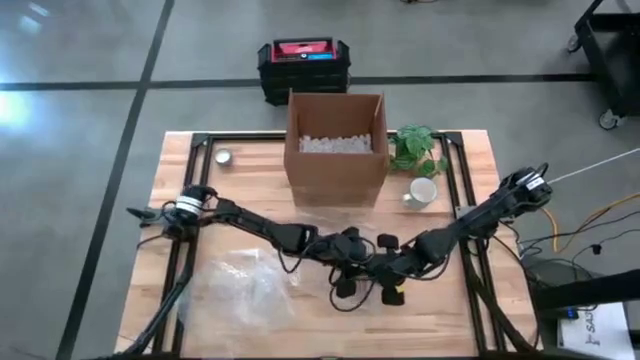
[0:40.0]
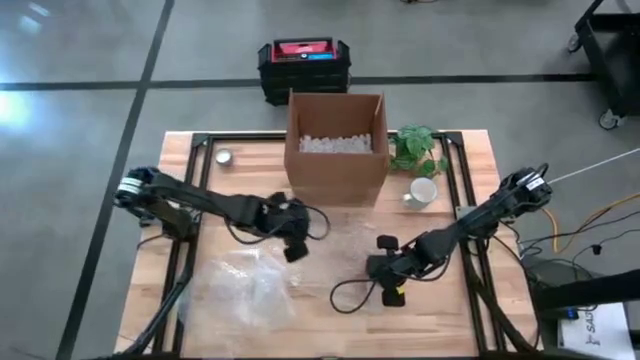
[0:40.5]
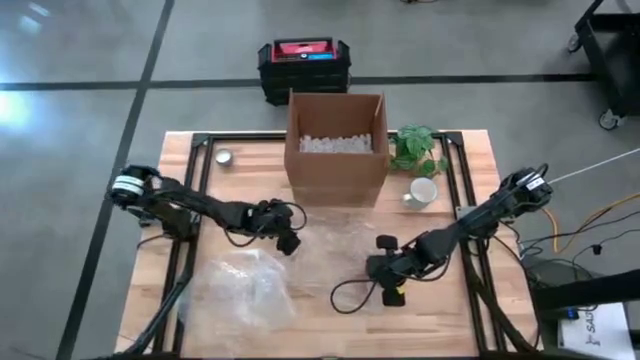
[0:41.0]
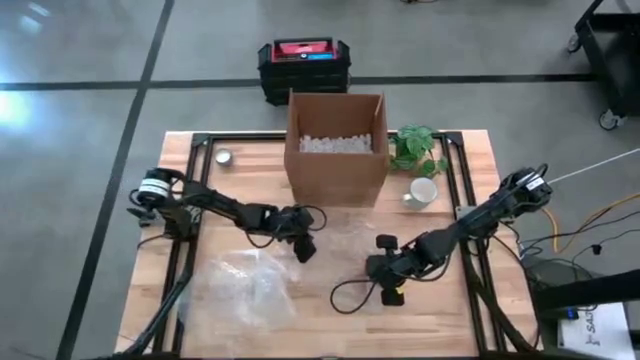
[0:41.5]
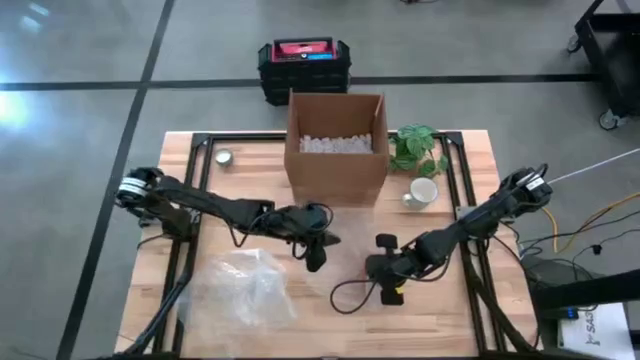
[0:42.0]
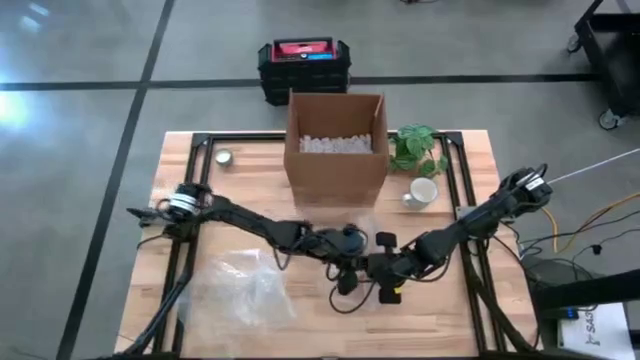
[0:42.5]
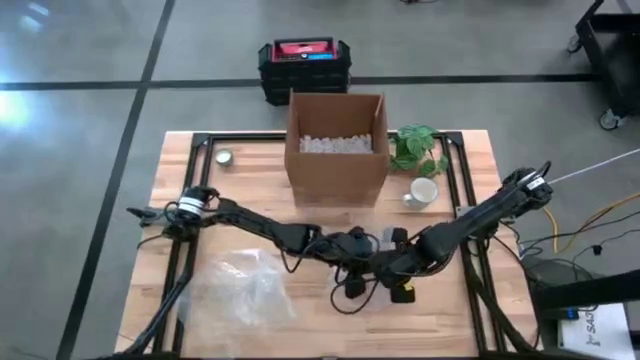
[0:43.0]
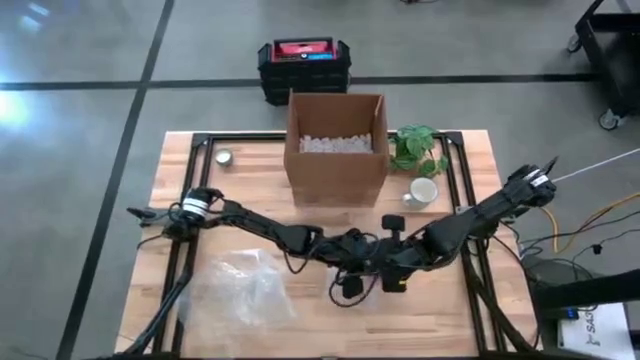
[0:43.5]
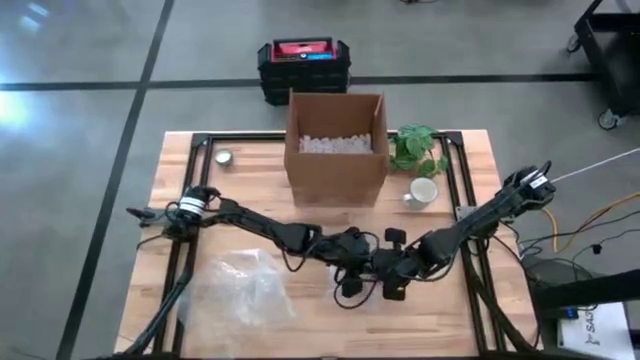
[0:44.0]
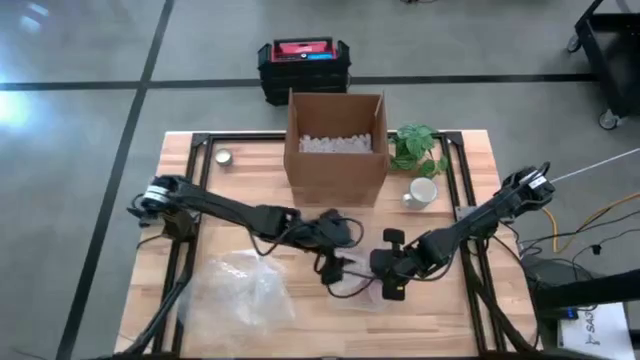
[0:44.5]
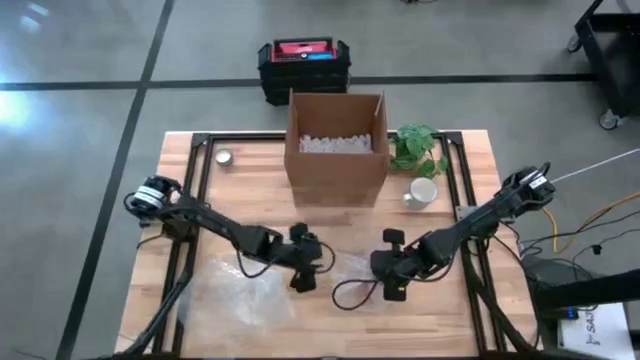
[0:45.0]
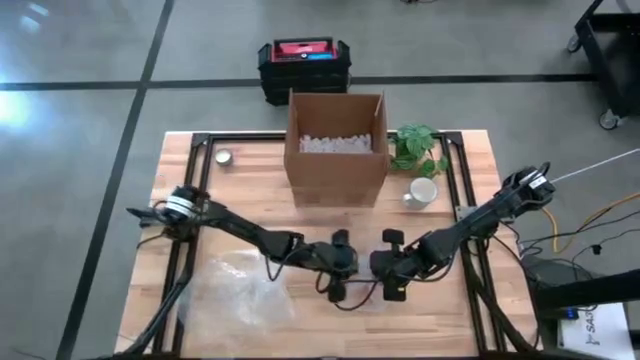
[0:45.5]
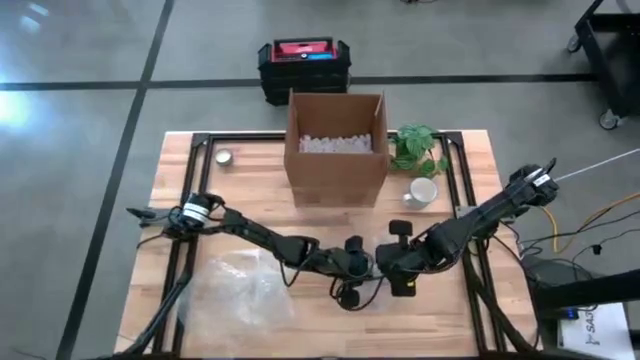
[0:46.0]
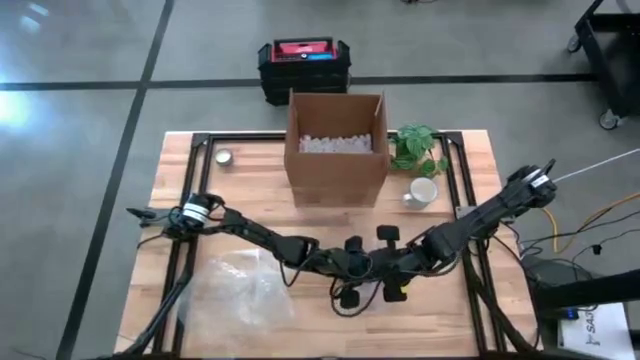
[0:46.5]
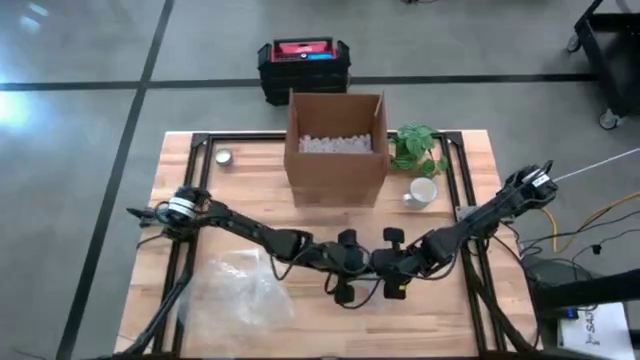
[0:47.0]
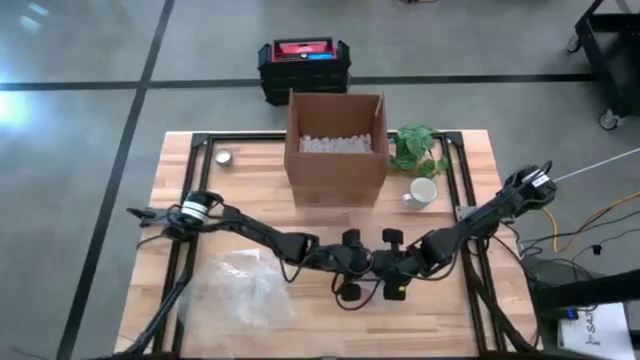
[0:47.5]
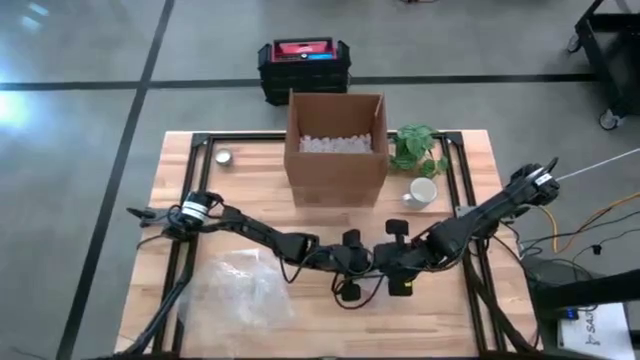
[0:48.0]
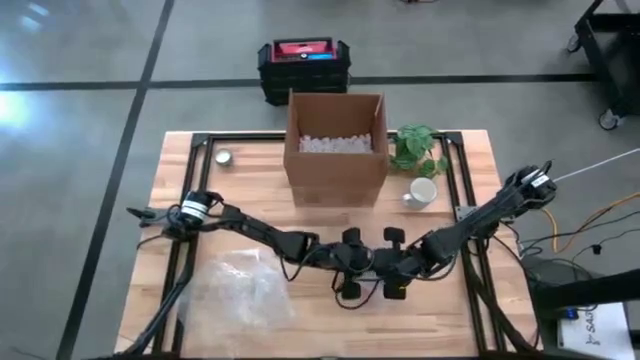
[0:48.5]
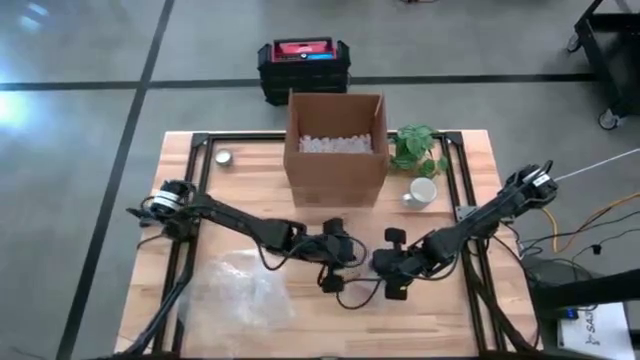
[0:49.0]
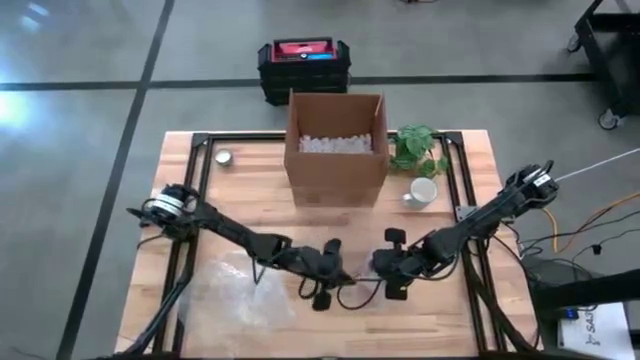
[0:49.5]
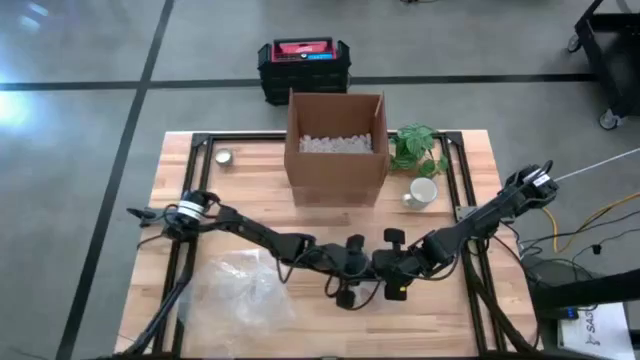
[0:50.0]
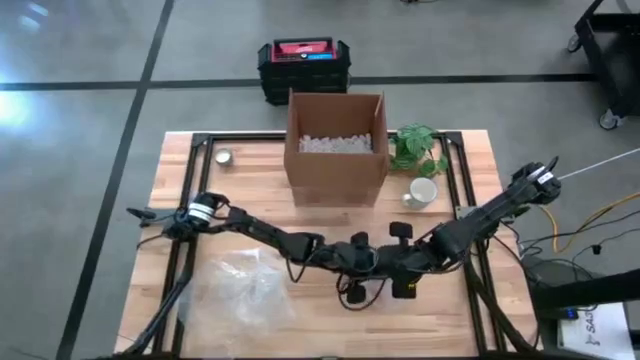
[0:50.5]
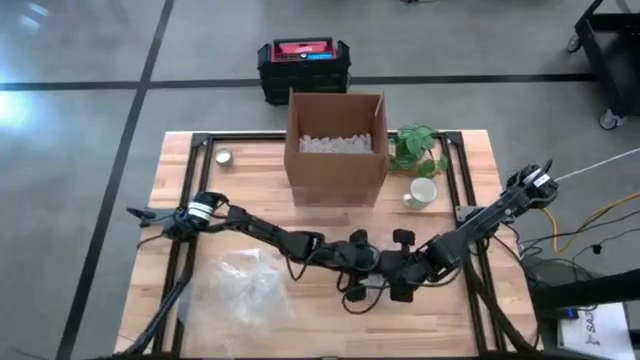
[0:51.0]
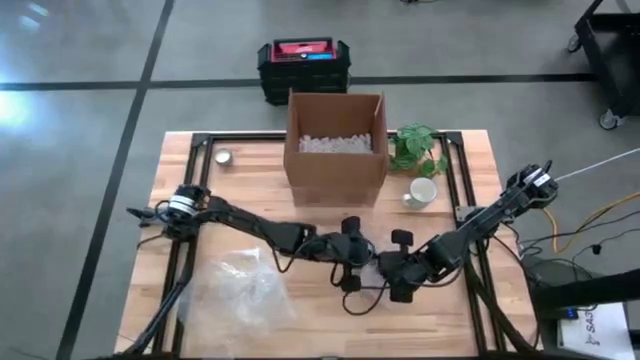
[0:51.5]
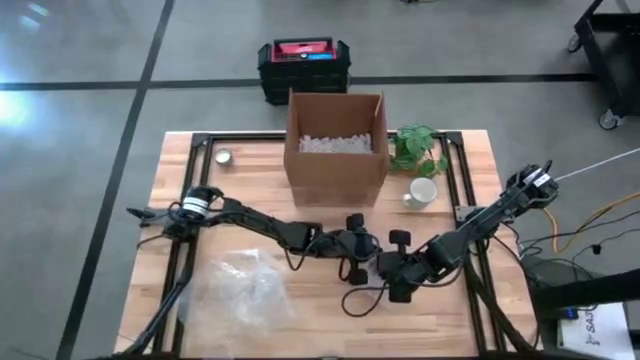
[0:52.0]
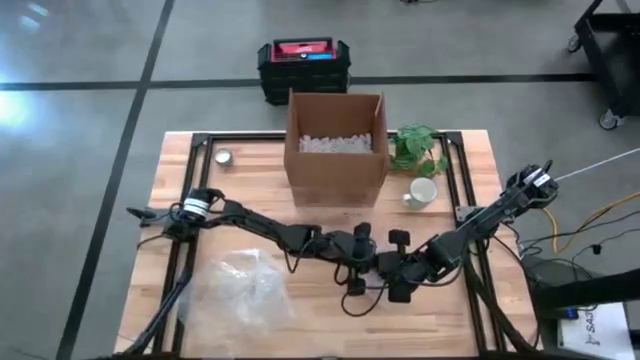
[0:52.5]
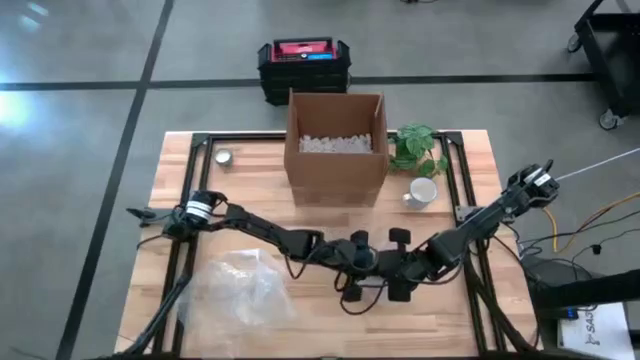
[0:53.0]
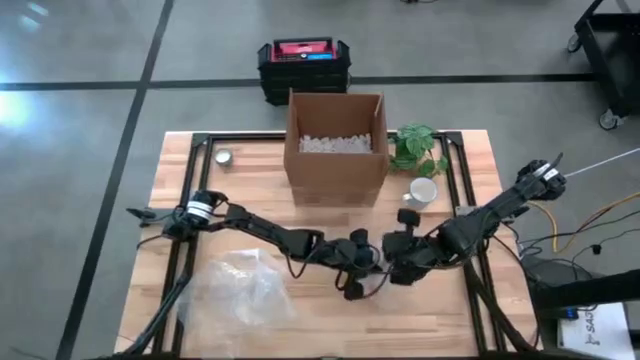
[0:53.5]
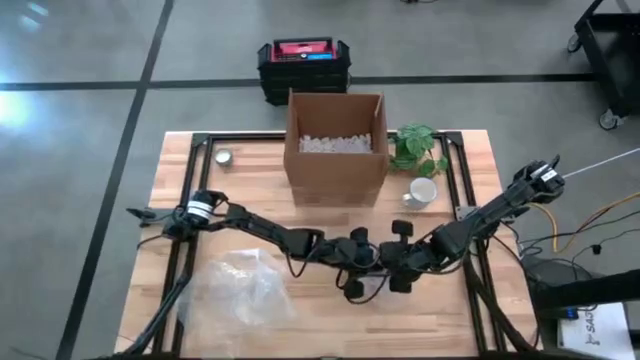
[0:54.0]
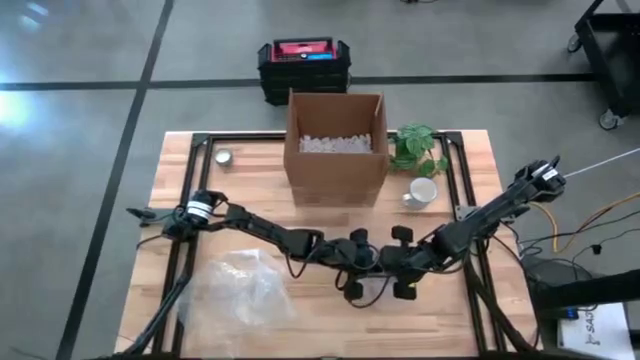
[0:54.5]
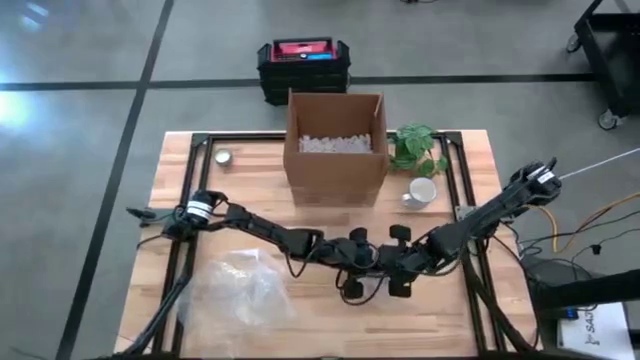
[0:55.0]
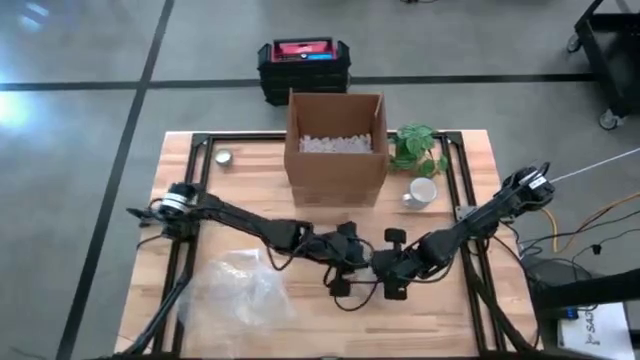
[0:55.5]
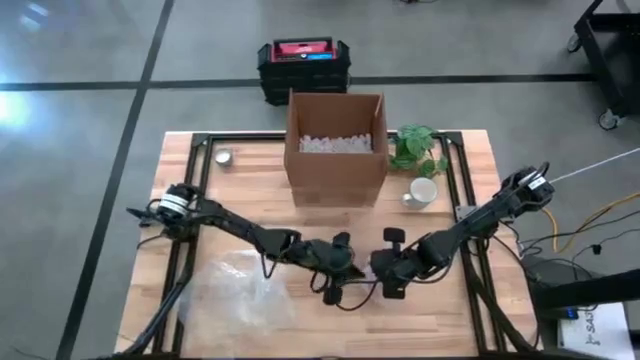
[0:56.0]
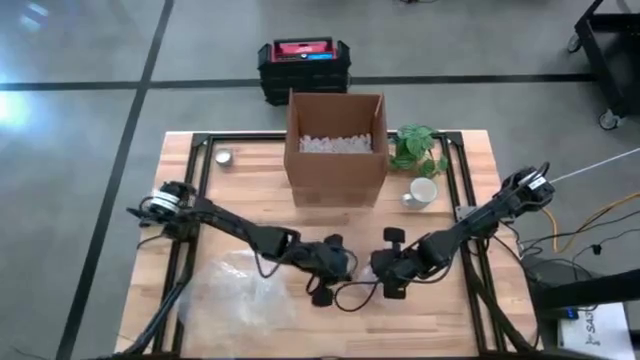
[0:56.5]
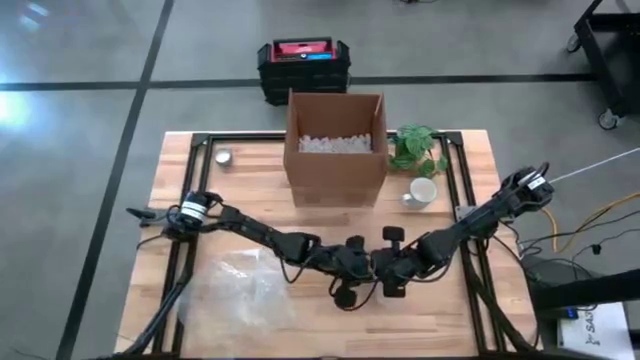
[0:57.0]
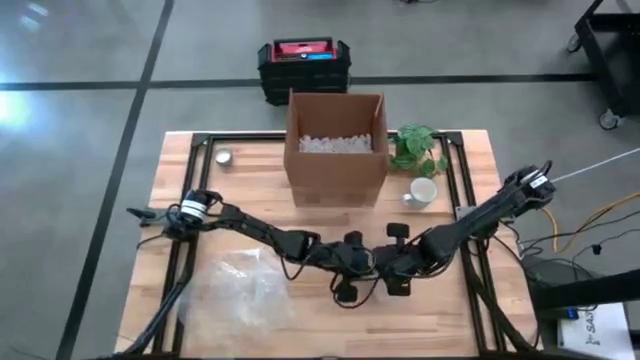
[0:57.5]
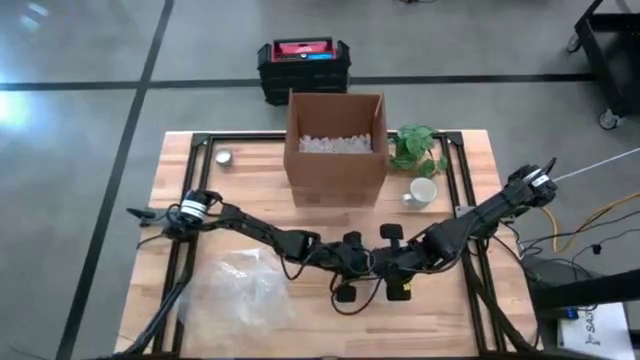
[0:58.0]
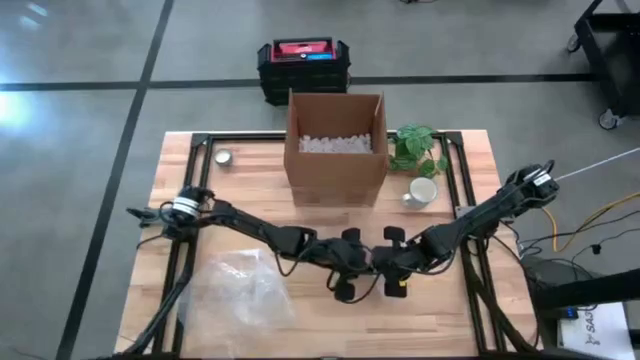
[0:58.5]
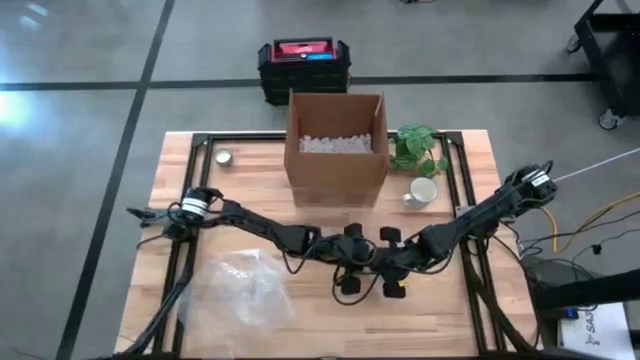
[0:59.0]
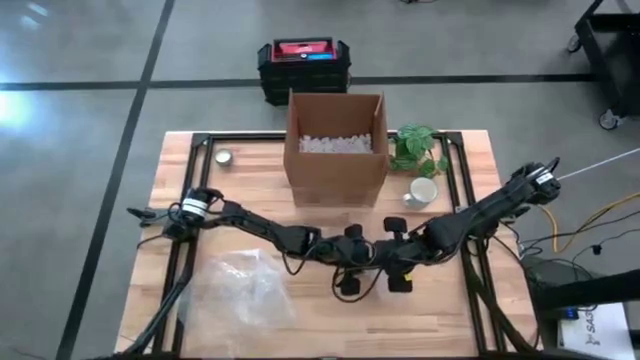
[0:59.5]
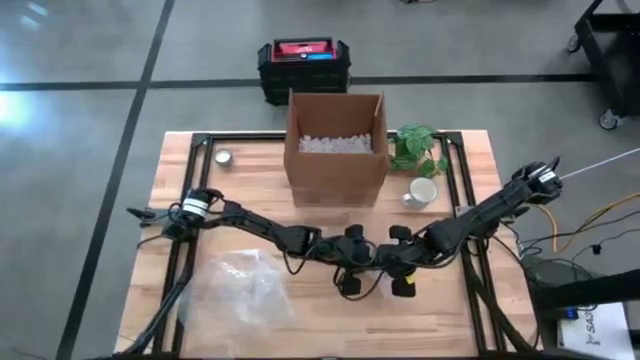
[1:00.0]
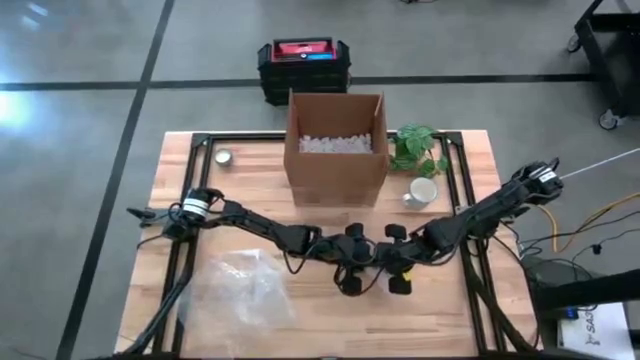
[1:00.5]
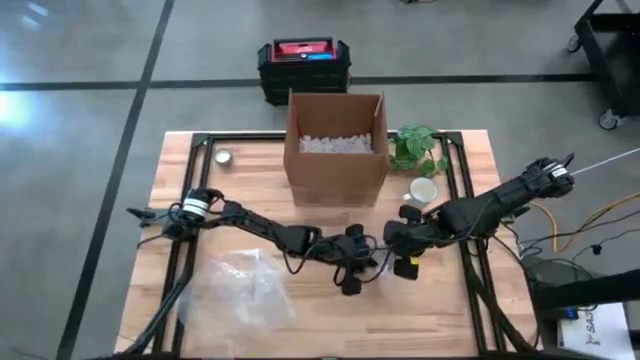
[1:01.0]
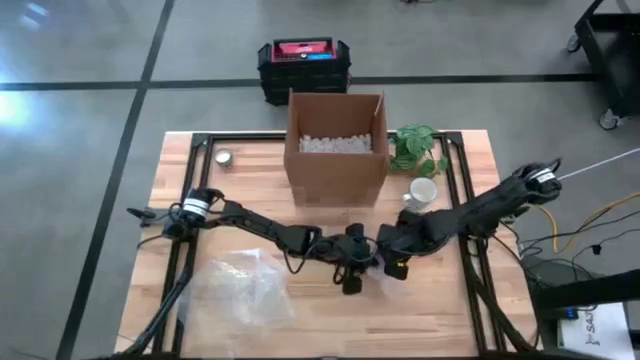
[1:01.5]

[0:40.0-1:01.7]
Task: wrap mug
Wrap the orange mug with the right transparent bubble wrap
